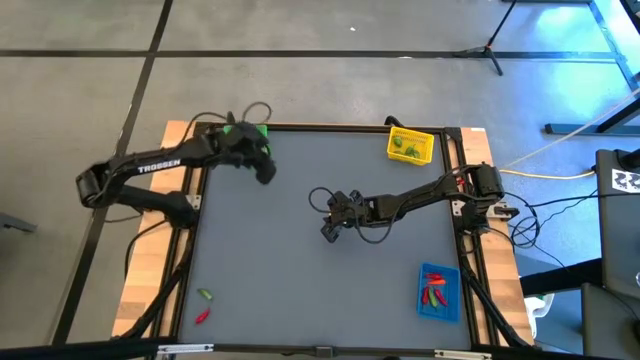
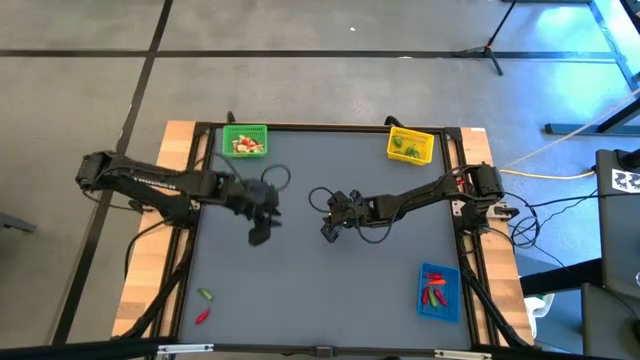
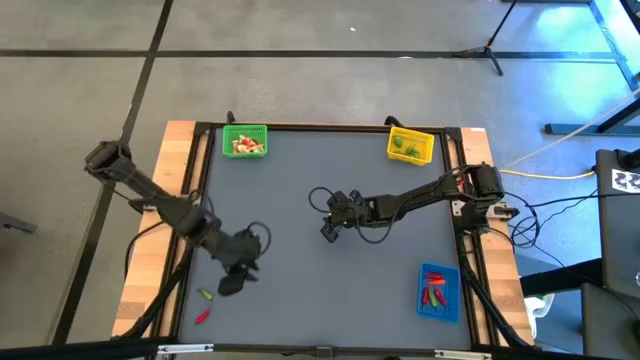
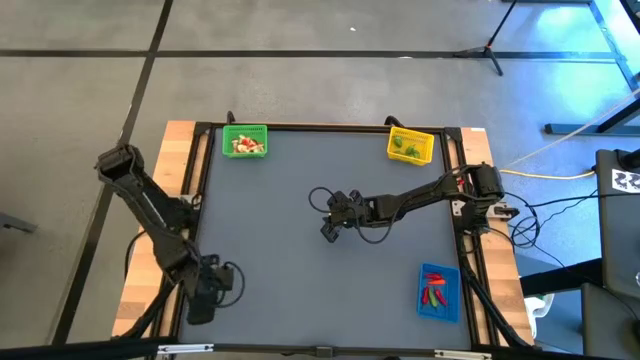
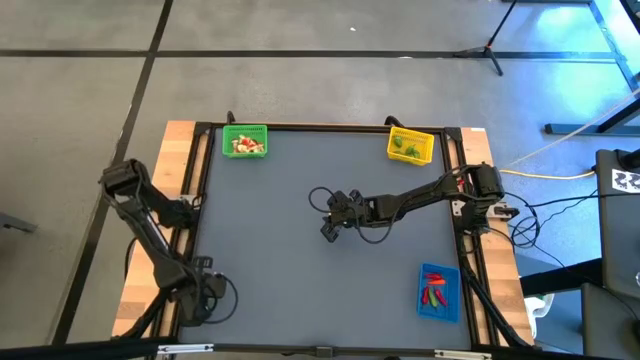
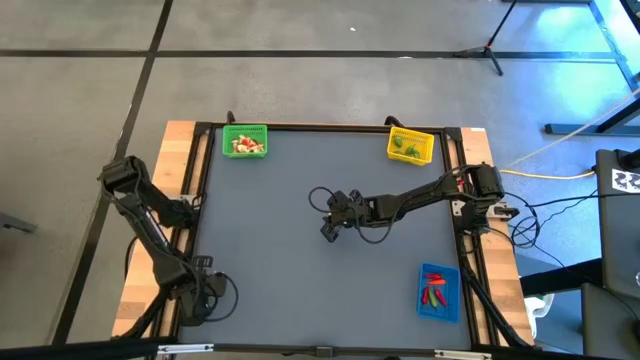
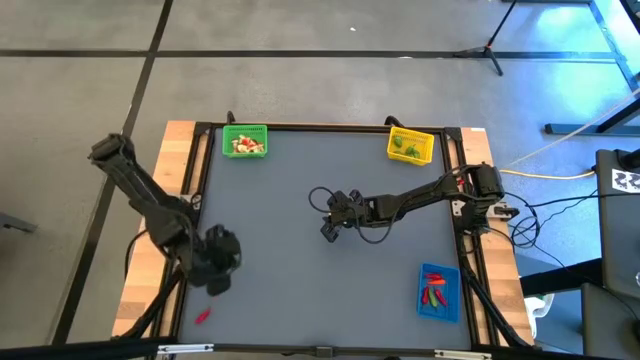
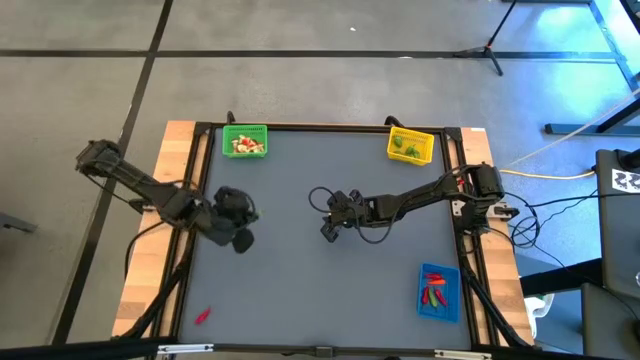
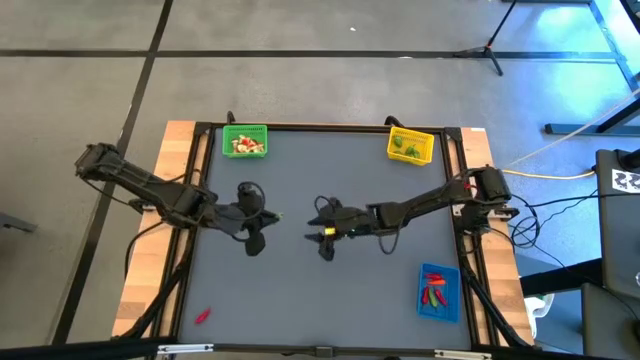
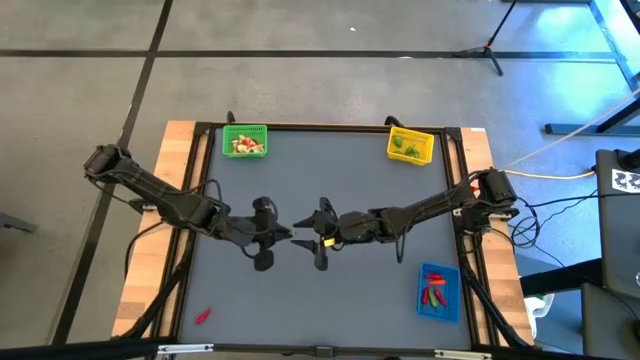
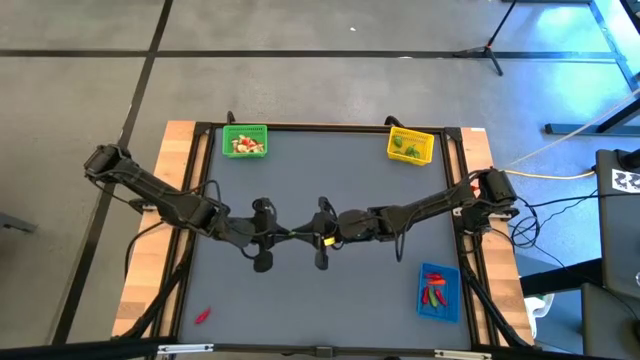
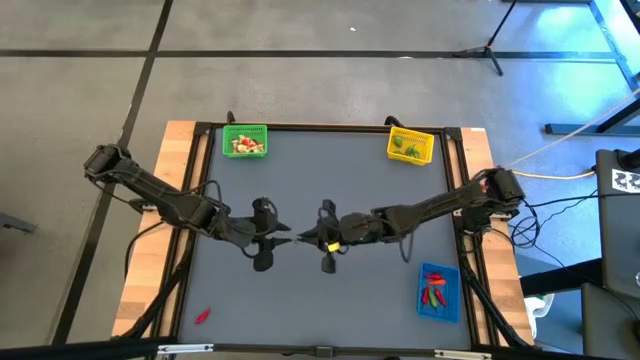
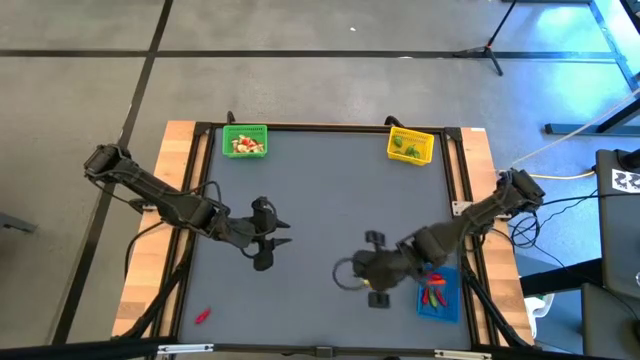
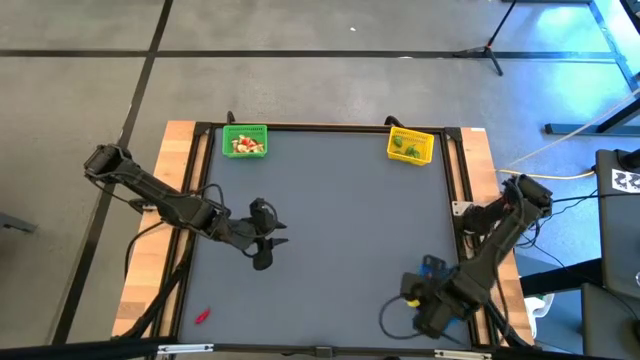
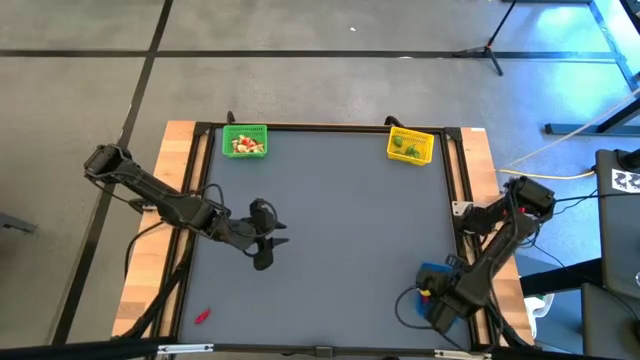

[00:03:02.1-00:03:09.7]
Task: Sort produce into baskets
Put the green chili pepper into the blue bin

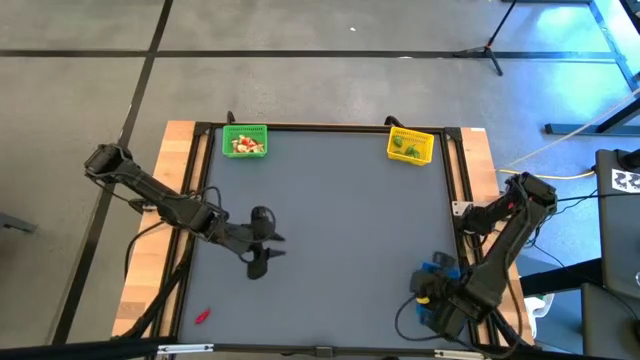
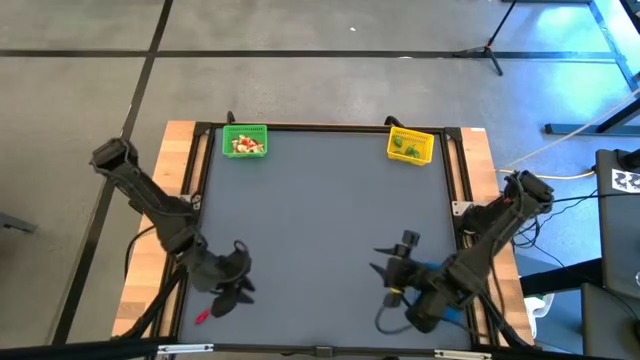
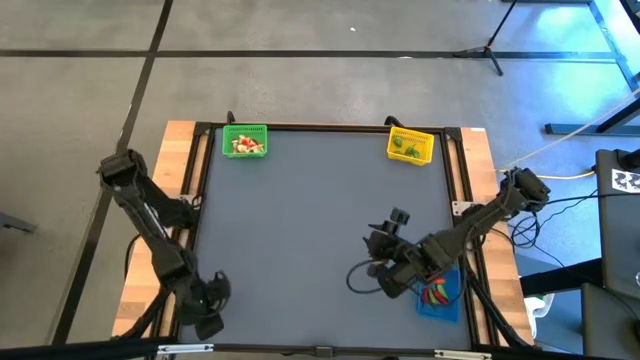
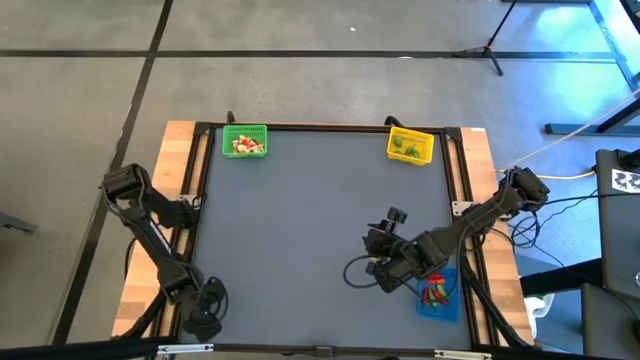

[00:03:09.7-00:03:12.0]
Put the red chili pepper into the blue bin

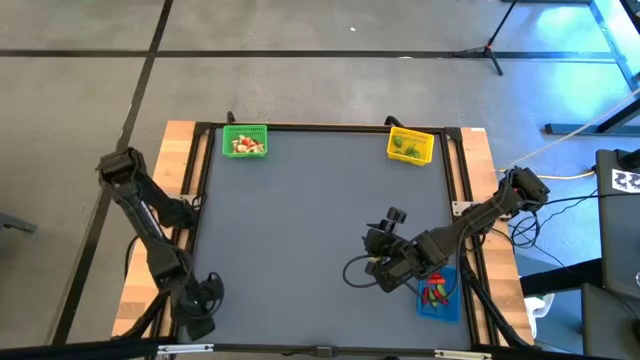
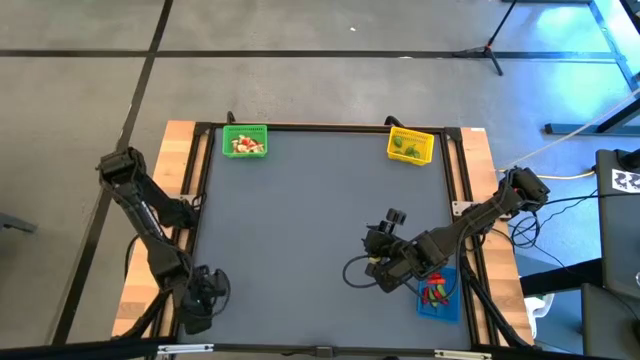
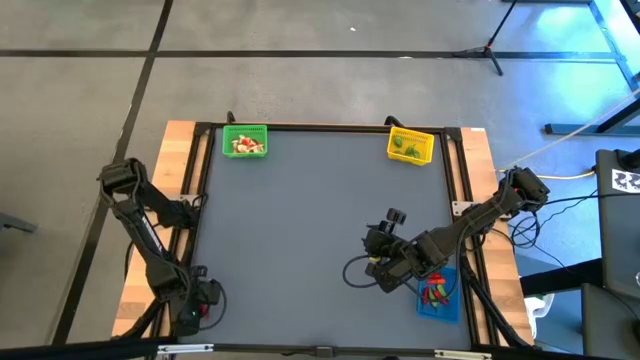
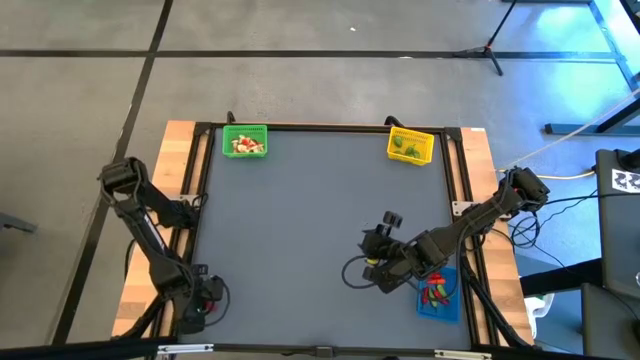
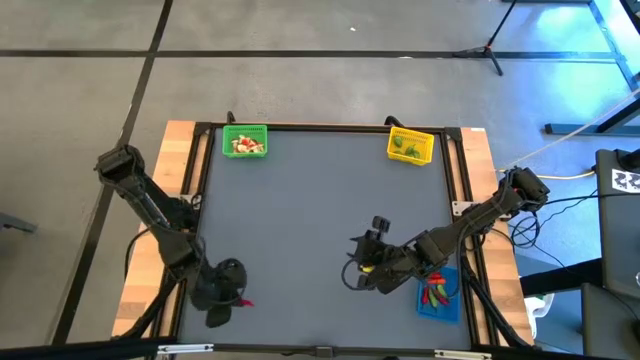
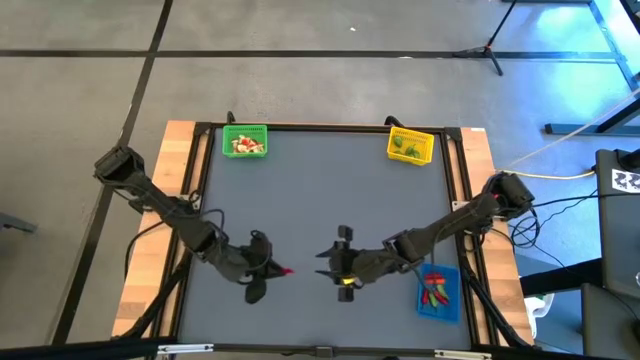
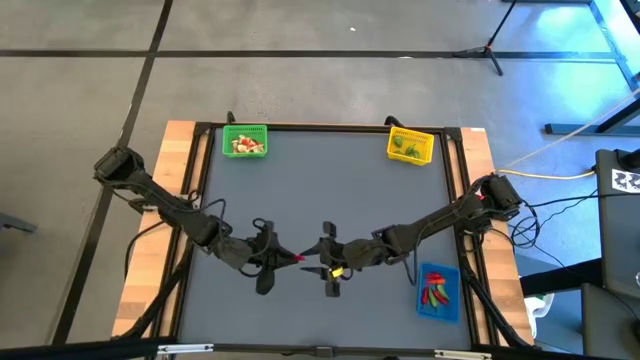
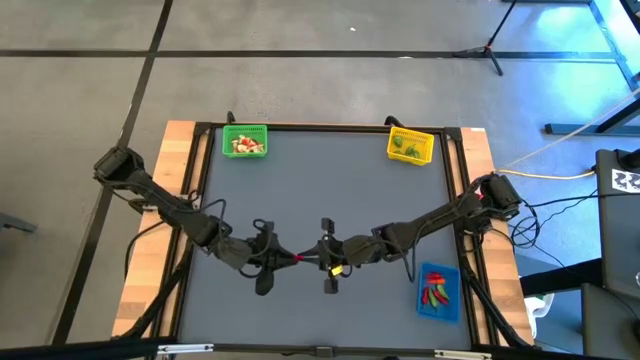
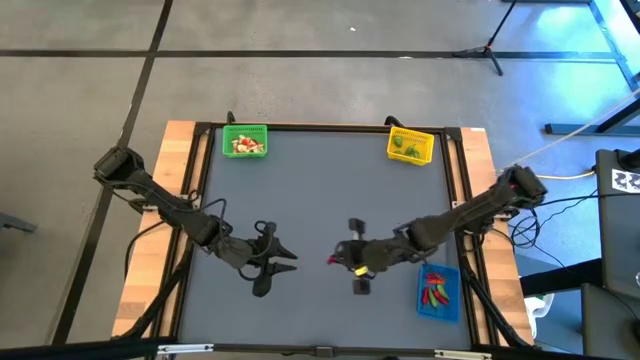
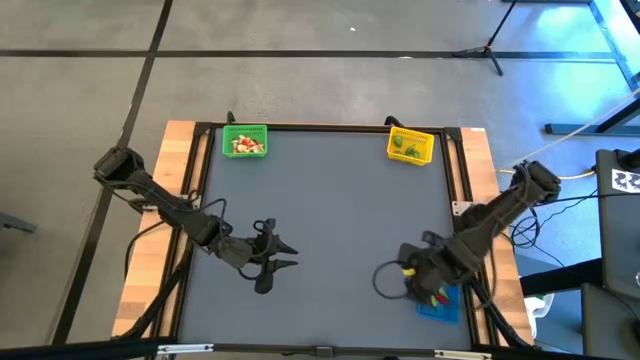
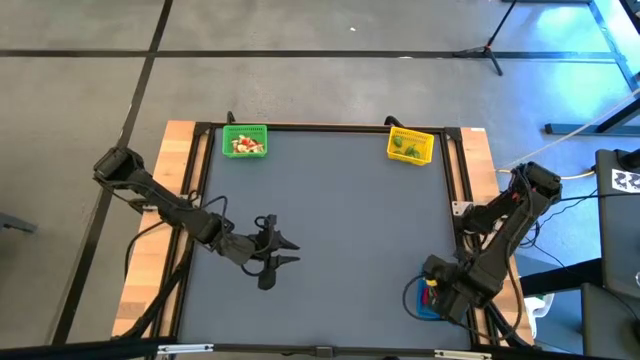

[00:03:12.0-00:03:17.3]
Put the red chili pepper into the blue bin

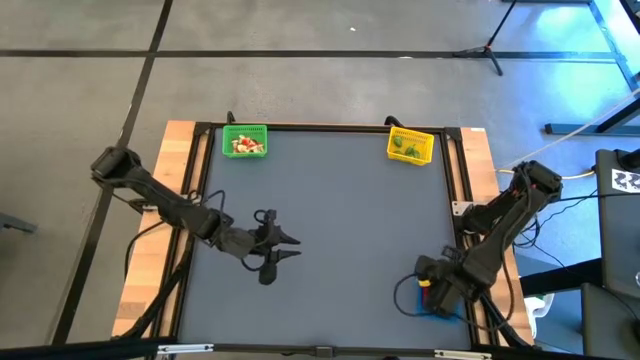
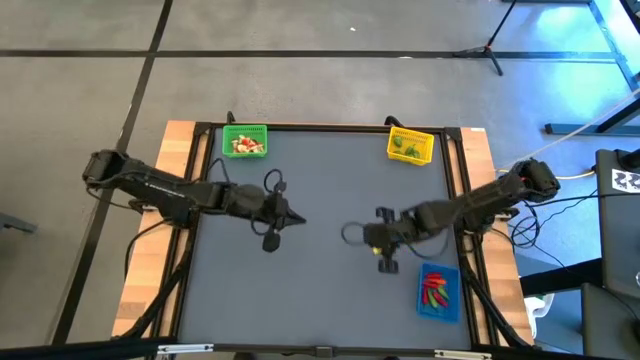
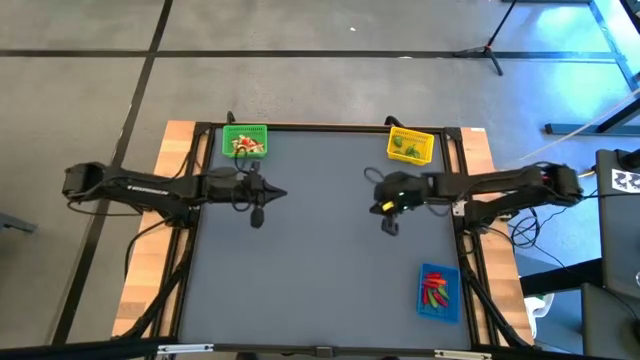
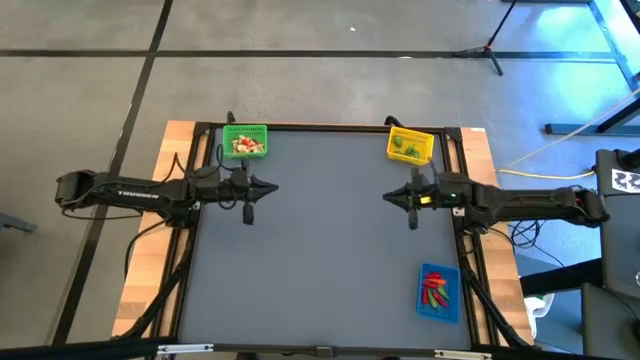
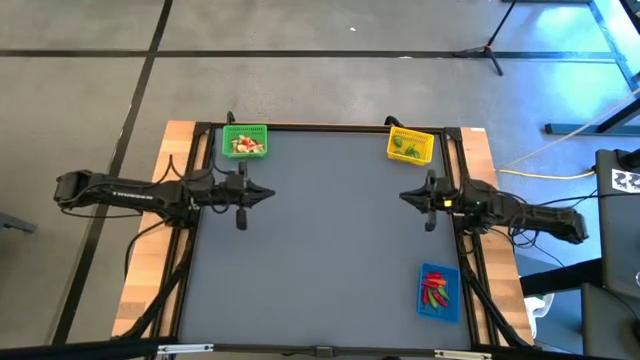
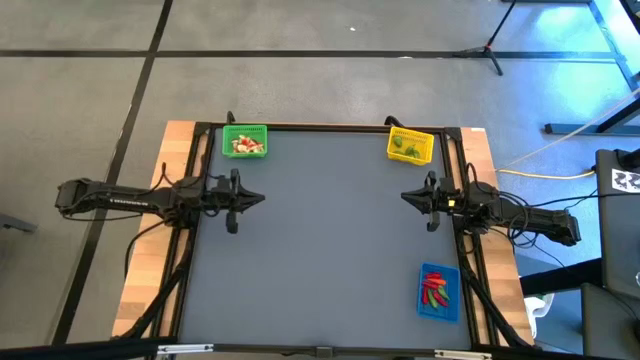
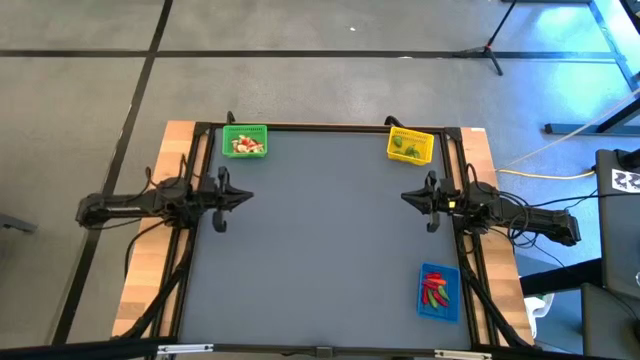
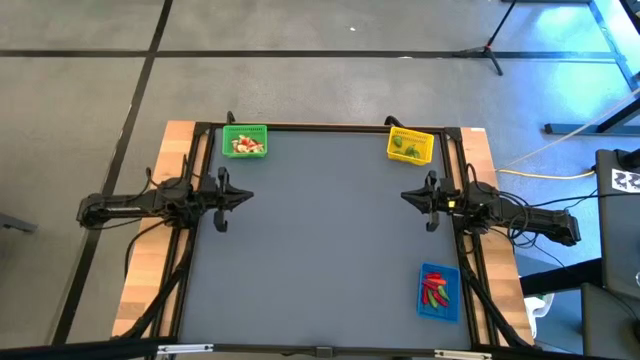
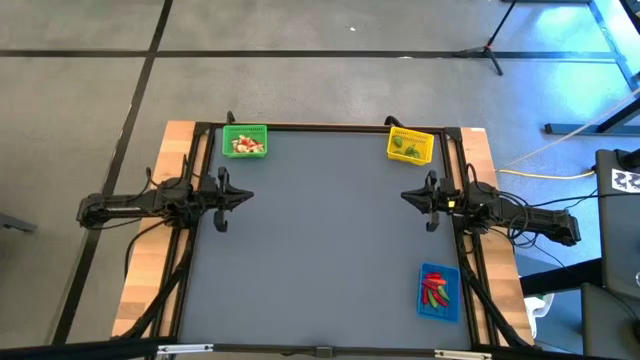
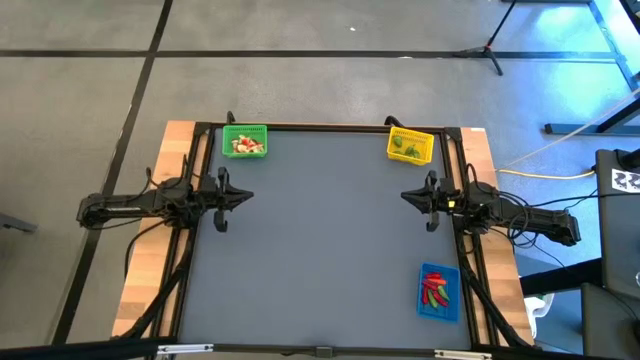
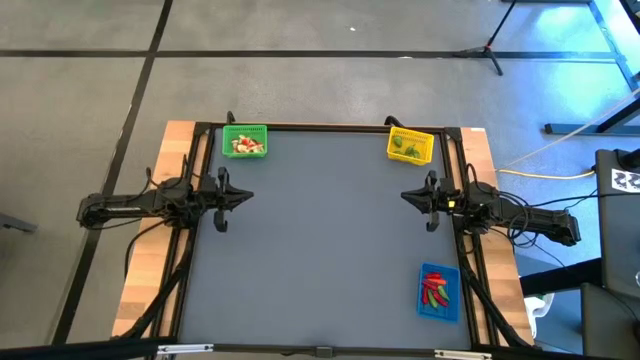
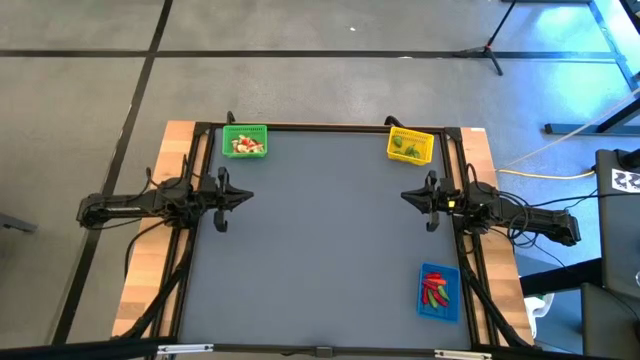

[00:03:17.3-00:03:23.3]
Return to Home Position
